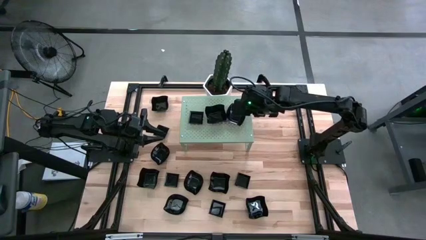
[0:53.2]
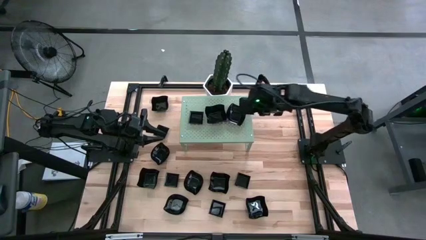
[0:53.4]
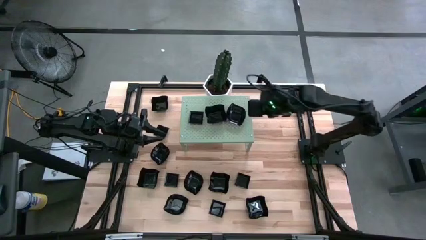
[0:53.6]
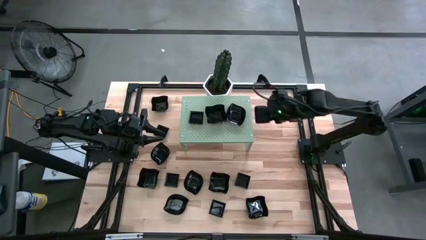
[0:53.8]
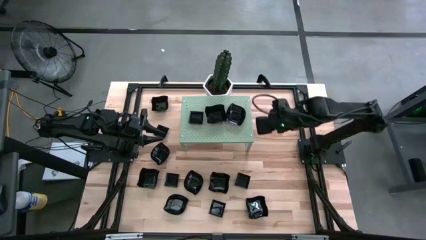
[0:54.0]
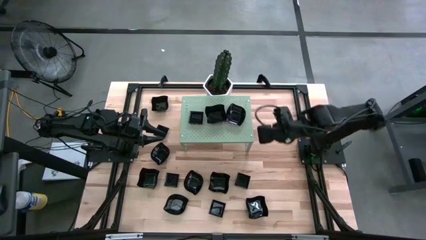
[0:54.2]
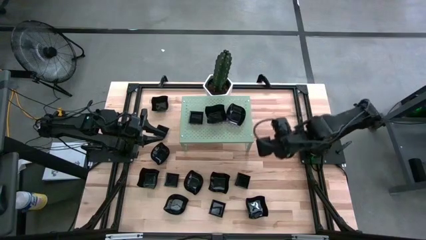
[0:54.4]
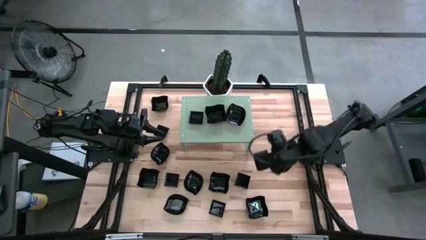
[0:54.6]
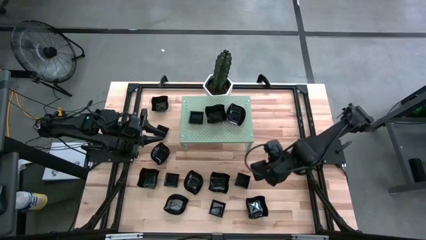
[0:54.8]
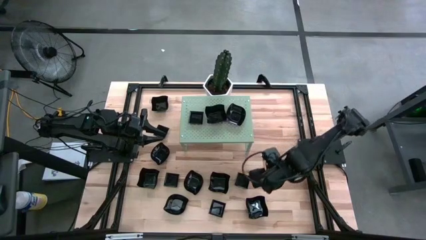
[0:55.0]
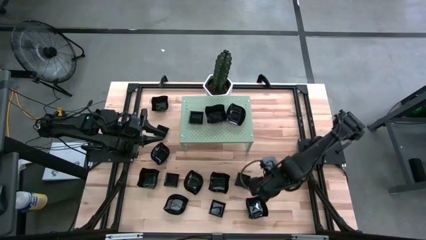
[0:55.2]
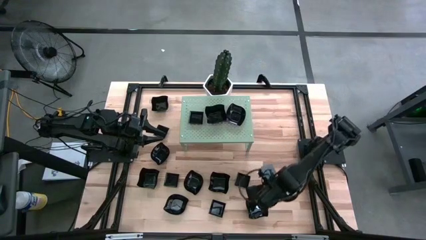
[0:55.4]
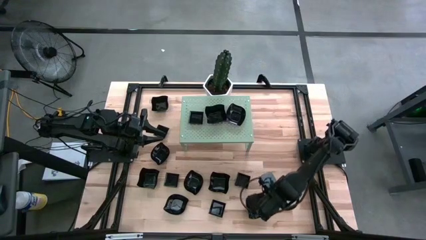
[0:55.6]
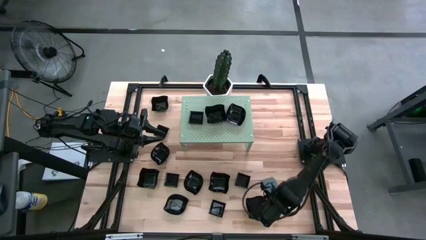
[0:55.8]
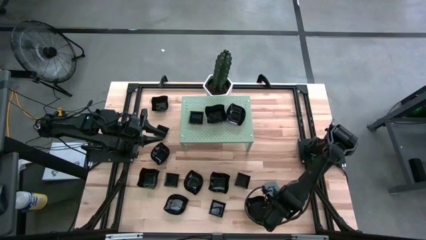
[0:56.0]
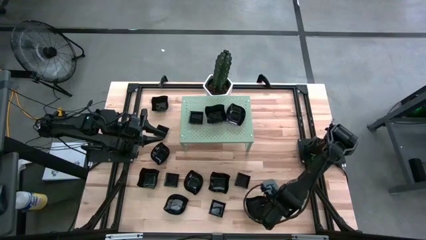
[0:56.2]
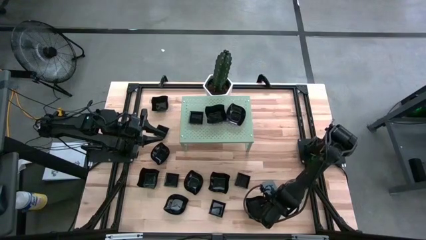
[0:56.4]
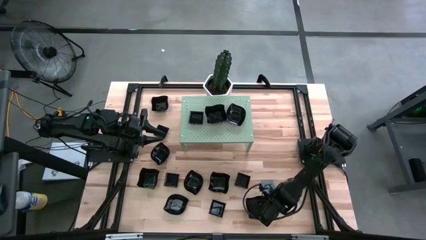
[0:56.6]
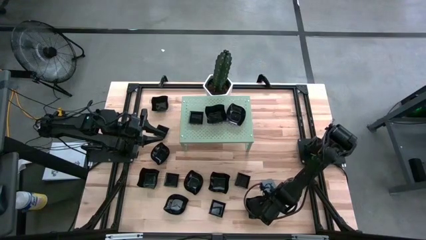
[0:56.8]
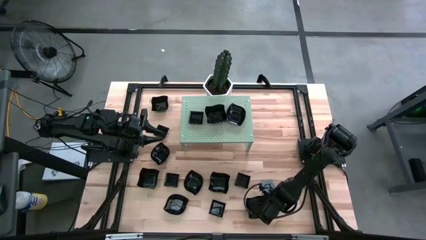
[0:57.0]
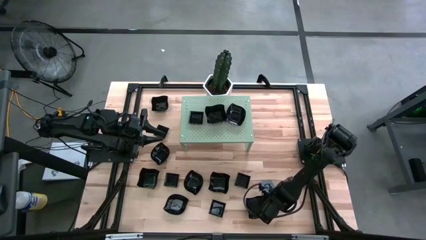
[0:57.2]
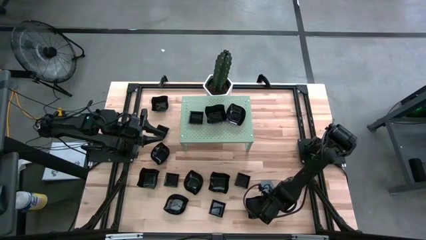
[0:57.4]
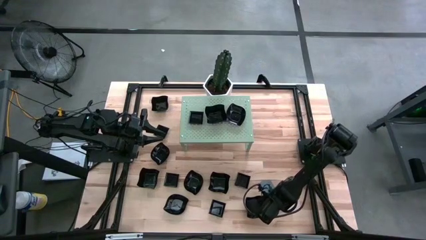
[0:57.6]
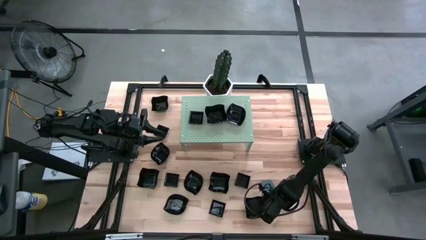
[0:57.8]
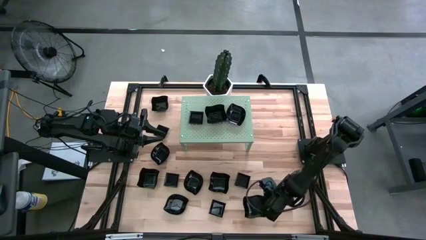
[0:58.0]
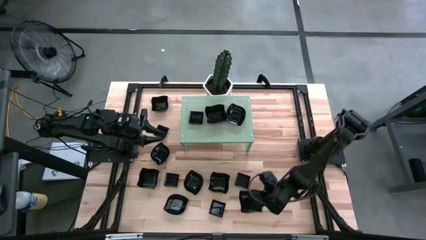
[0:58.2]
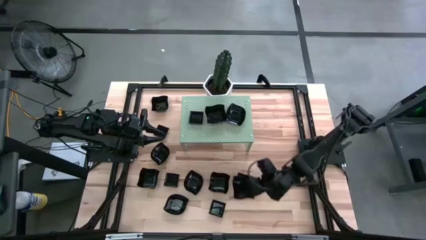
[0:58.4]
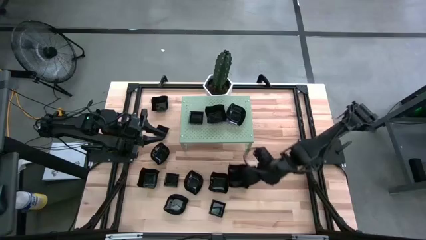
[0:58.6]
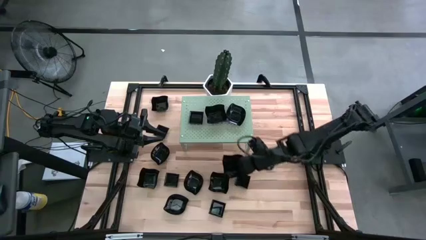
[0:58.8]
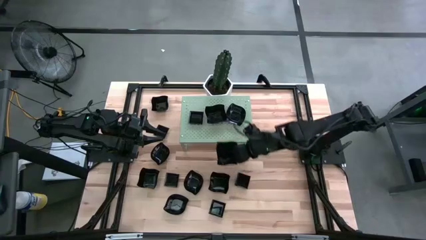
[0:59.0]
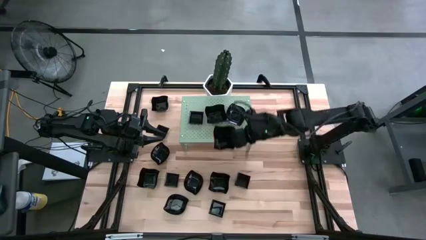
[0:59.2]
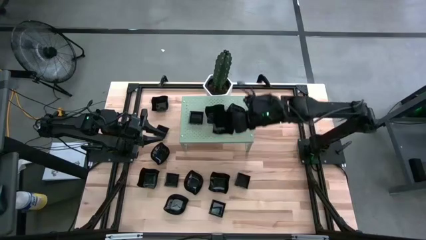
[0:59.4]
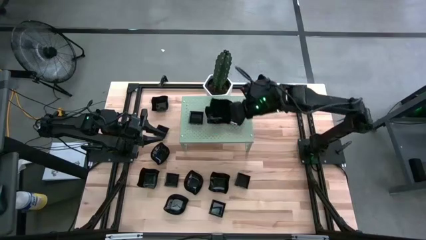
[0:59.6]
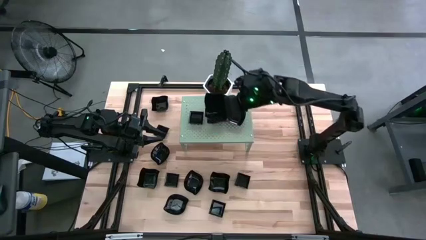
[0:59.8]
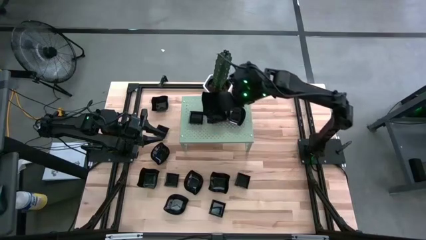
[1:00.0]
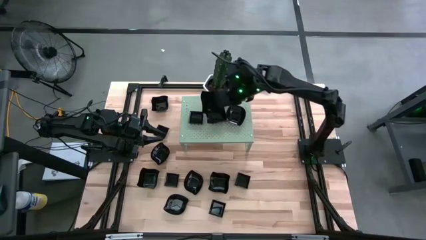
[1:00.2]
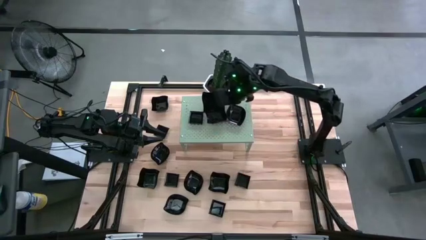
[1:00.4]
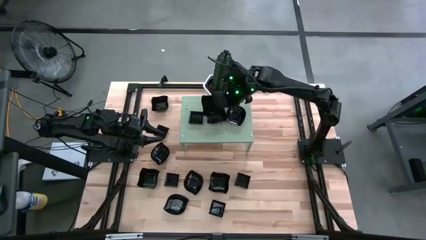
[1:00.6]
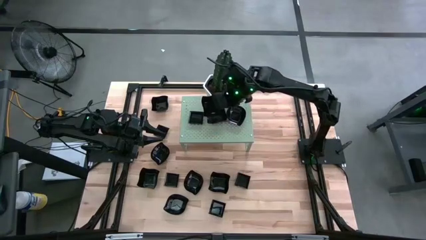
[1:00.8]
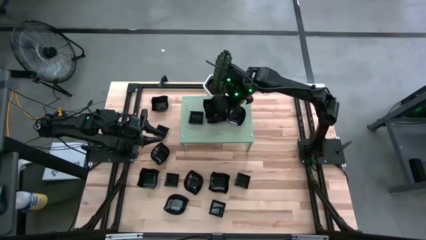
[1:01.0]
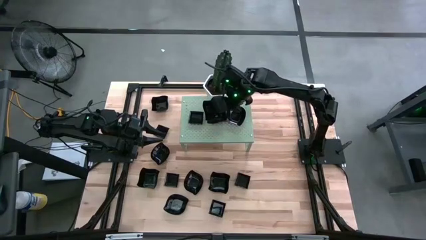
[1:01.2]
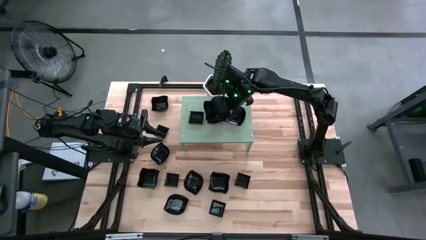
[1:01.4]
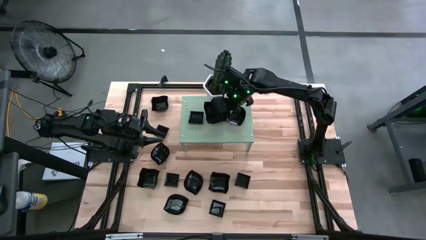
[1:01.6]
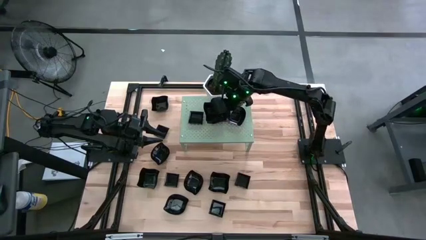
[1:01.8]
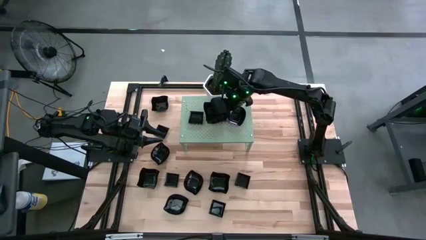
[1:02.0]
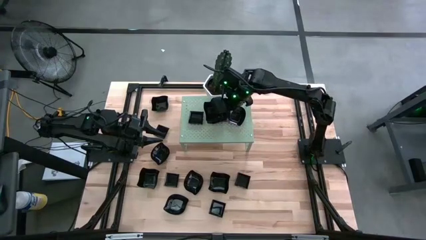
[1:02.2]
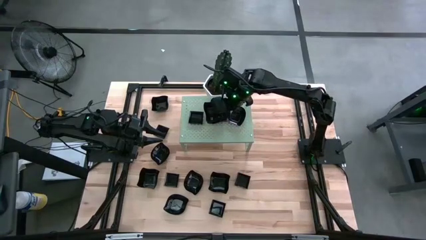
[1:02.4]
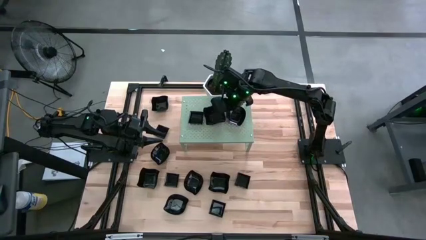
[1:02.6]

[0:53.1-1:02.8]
Task: Pick & Place Mini shaped plates
Stack the distorted square plate on top of the distorted square plate on the shelf

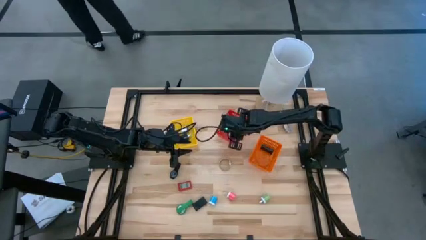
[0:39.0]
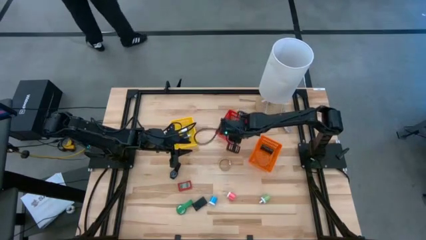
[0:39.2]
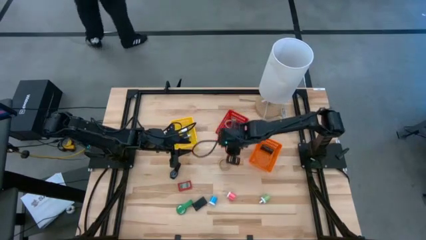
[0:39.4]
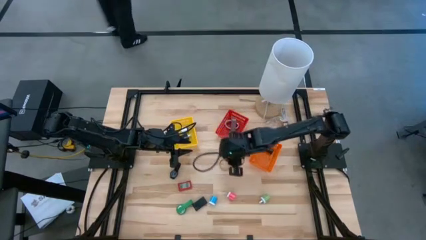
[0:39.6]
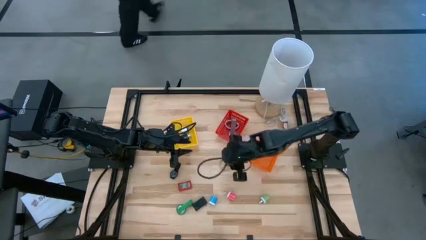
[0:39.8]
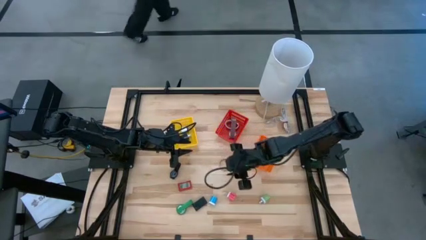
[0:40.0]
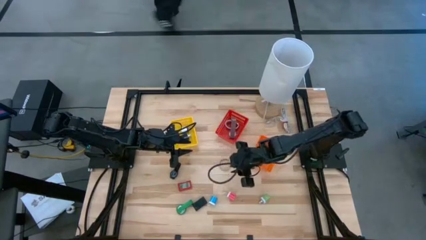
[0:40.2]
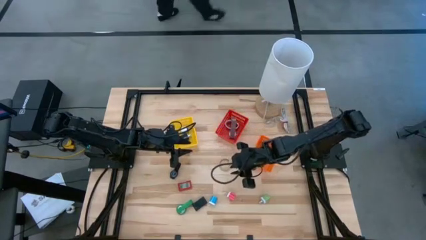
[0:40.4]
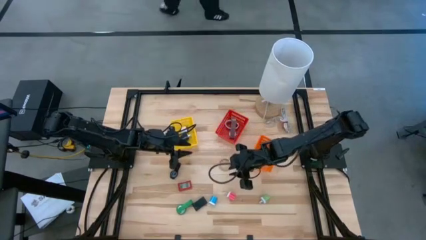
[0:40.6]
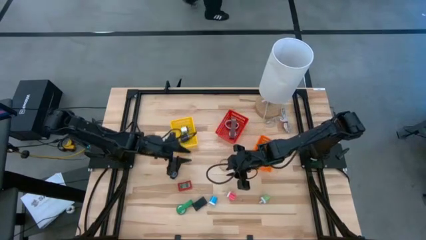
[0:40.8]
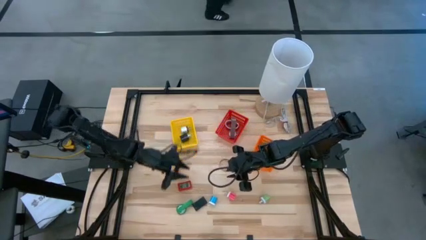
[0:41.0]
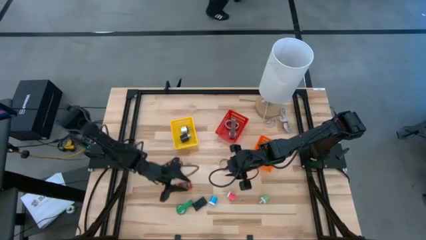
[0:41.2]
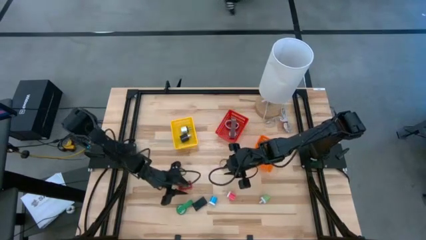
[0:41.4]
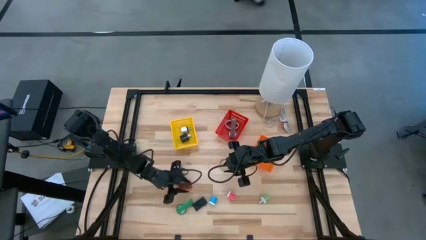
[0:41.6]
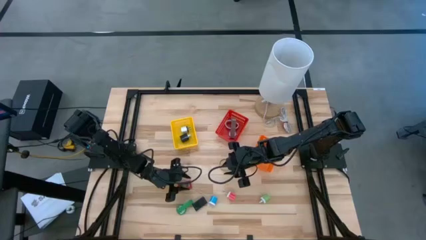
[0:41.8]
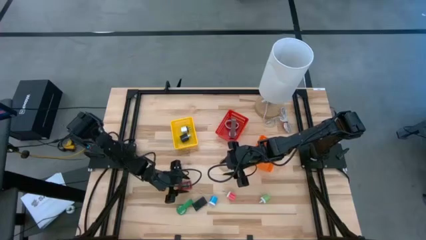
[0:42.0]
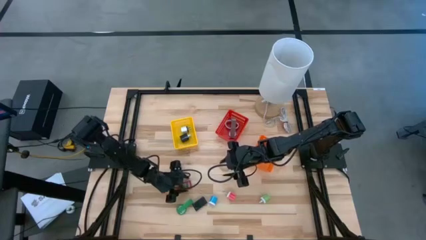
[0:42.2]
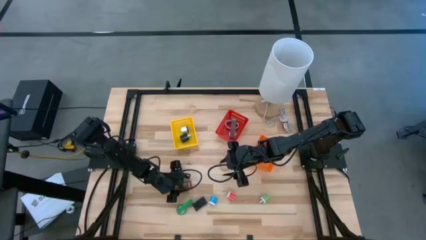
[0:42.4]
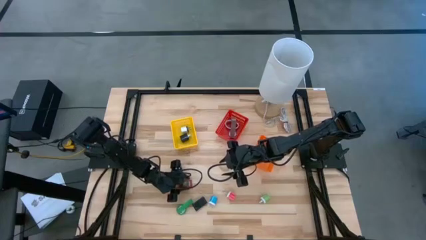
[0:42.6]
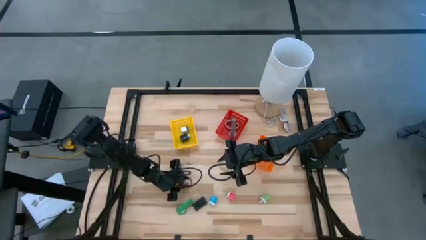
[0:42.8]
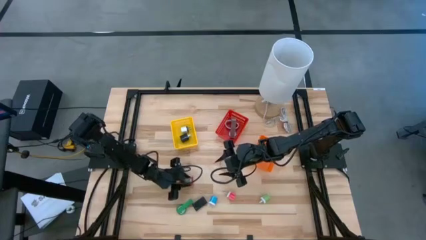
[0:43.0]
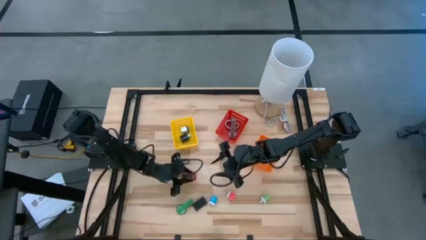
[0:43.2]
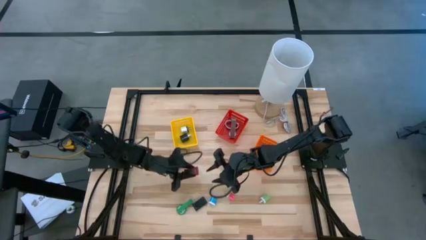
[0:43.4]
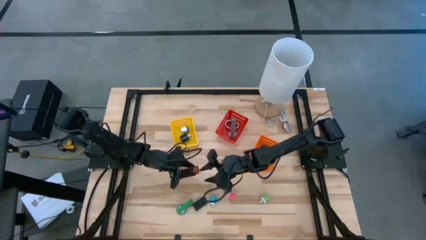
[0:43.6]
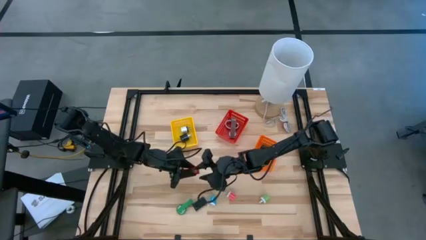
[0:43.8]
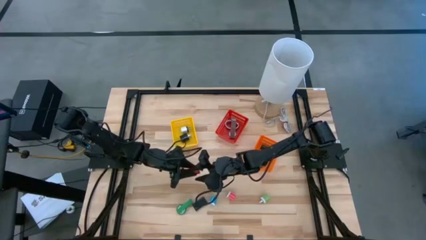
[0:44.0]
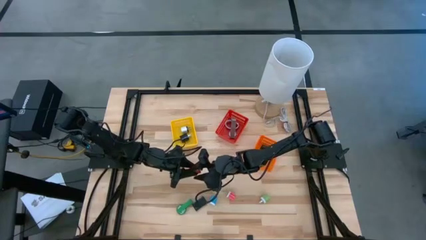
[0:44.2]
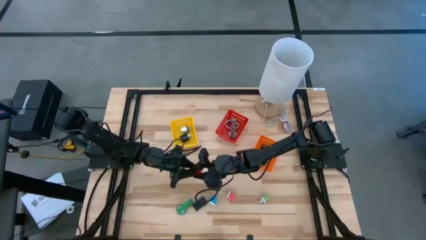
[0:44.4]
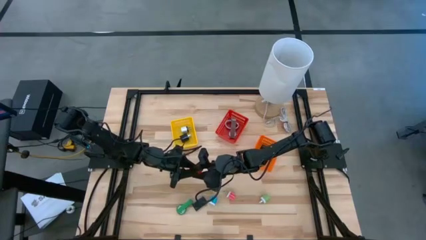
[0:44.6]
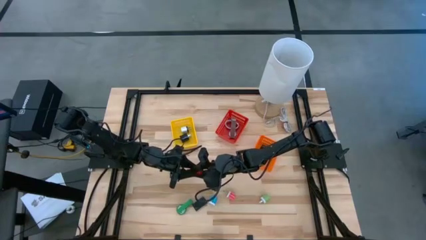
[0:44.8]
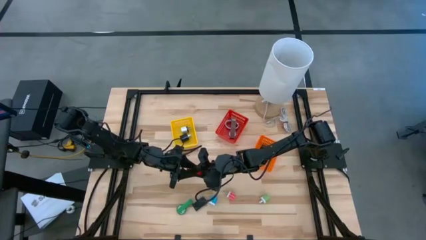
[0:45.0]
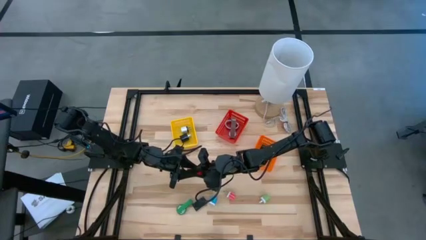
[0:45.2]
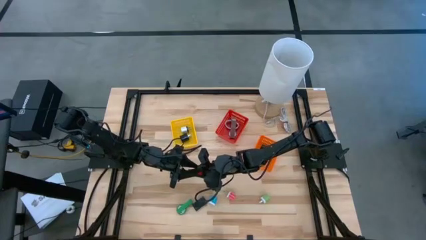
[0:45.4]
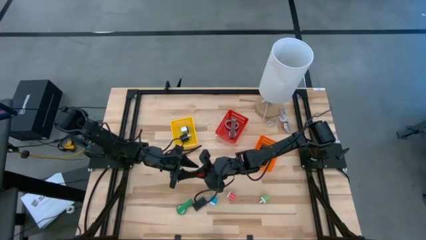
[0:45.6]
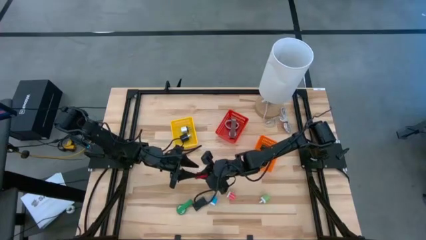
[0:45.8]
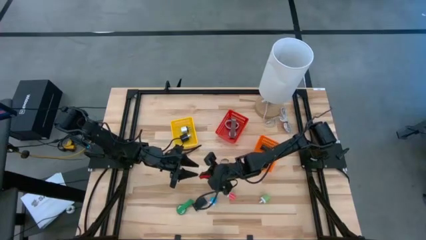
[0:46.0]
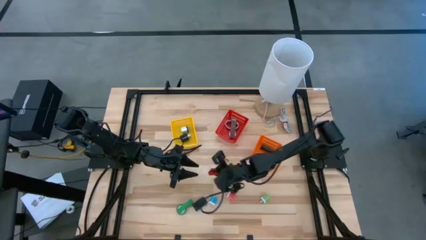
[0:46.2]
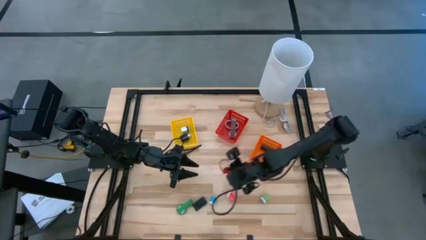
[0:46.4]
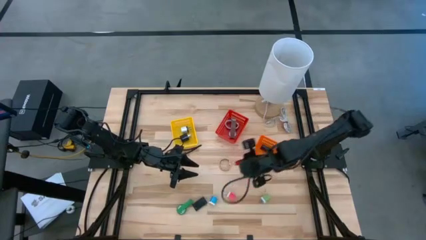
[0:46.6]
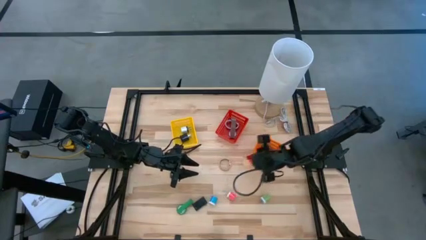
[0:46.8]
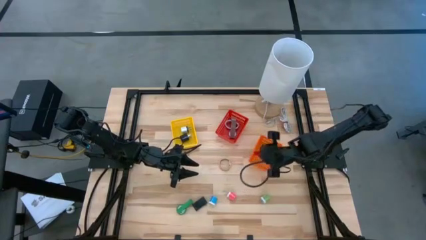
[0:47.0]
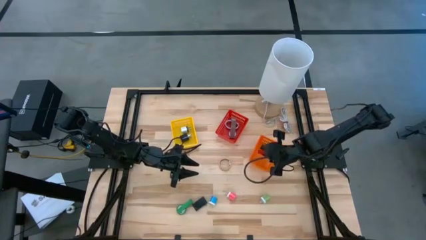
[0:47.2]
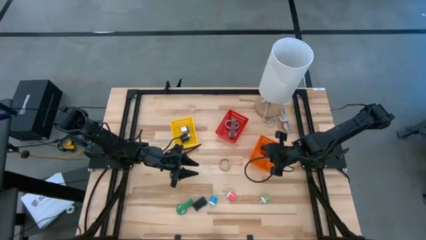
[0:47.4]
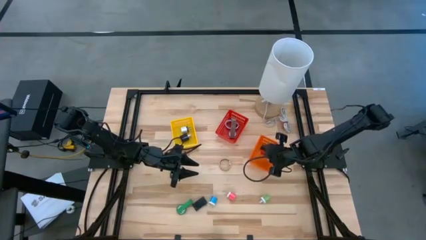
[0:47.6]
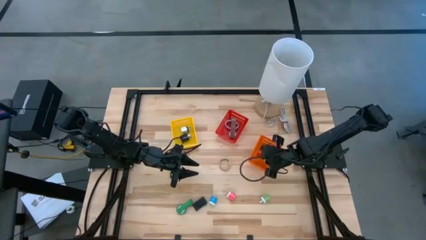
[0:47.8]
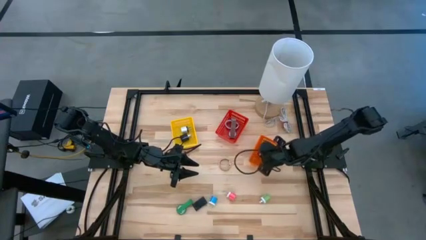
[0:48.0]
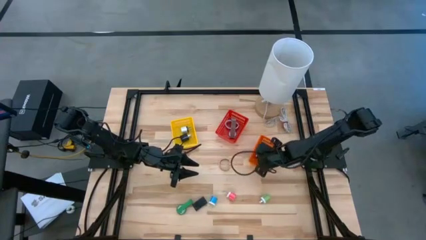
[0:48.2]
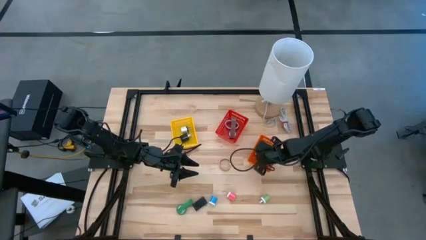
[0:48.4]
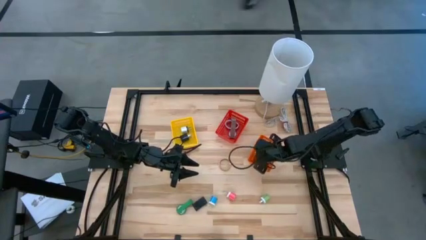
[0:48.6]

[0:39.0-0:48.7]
Task: Pick & Place Office items
Put the red digital clock into the orange basket
